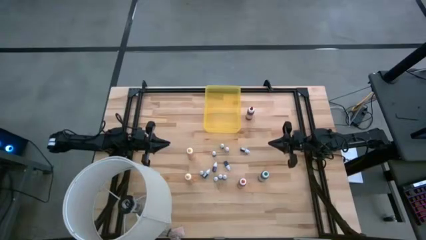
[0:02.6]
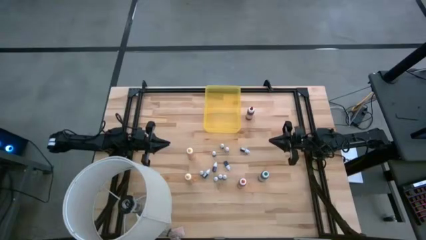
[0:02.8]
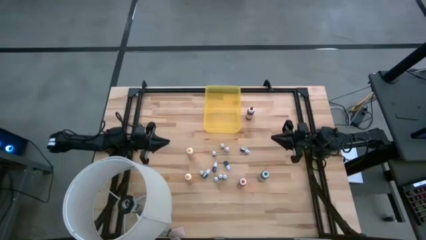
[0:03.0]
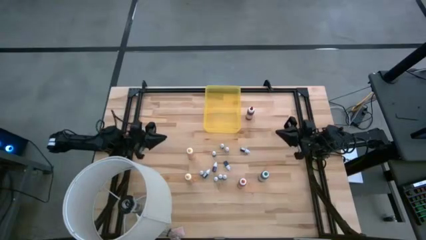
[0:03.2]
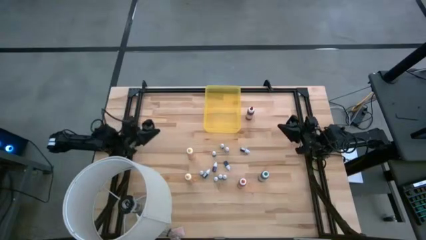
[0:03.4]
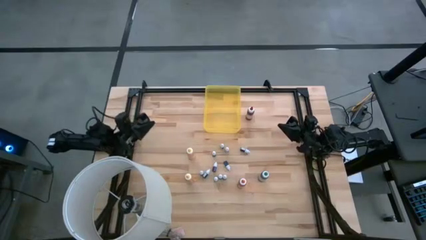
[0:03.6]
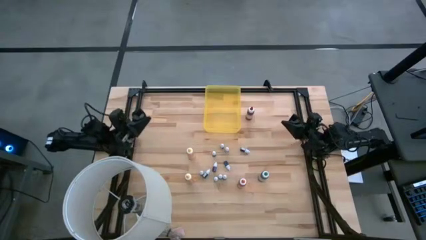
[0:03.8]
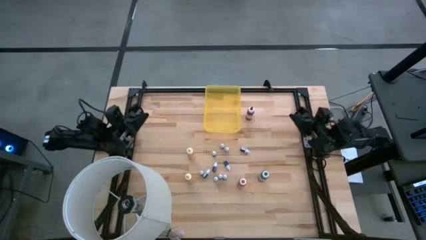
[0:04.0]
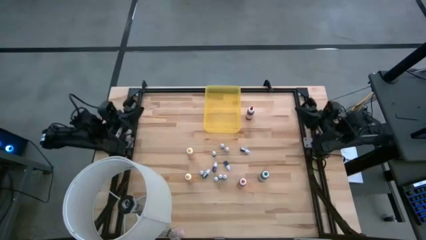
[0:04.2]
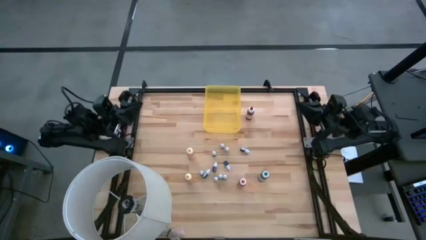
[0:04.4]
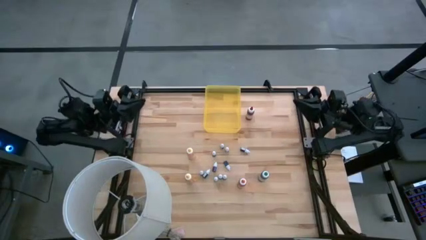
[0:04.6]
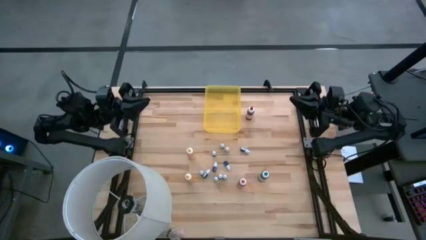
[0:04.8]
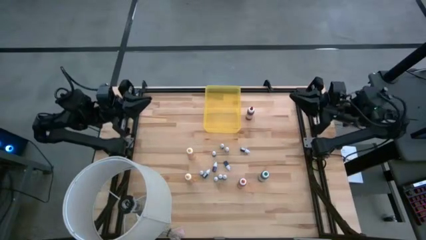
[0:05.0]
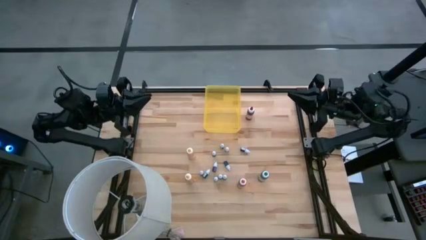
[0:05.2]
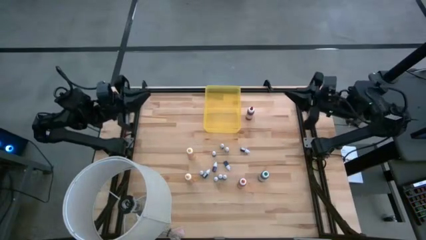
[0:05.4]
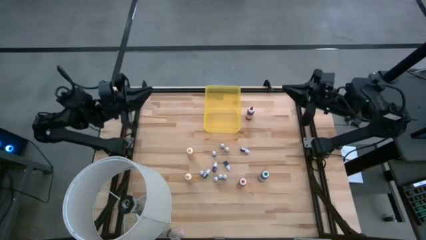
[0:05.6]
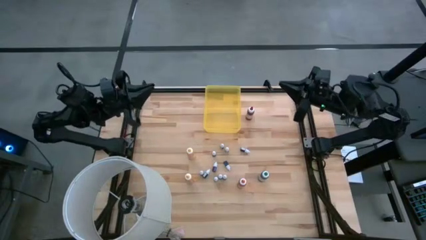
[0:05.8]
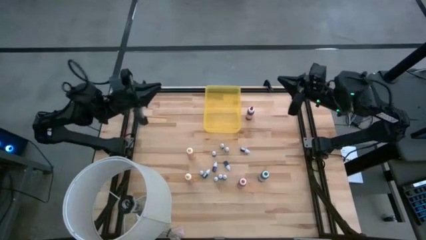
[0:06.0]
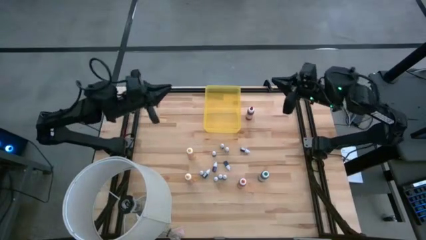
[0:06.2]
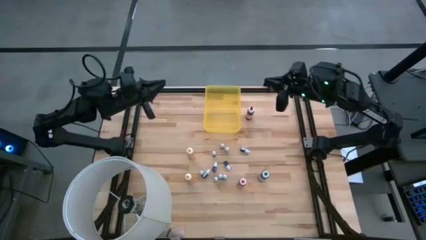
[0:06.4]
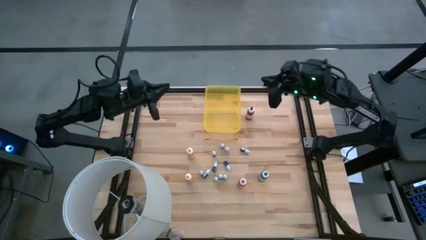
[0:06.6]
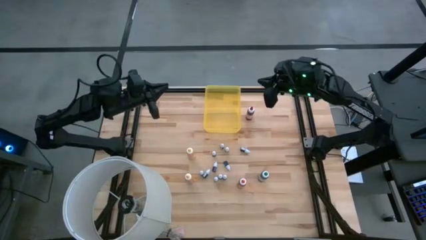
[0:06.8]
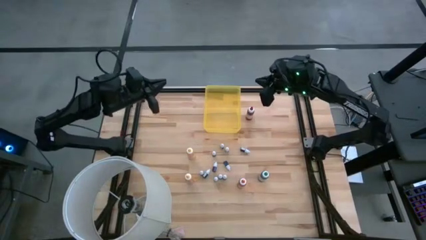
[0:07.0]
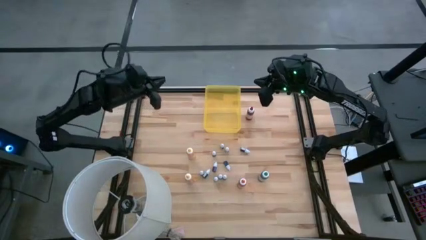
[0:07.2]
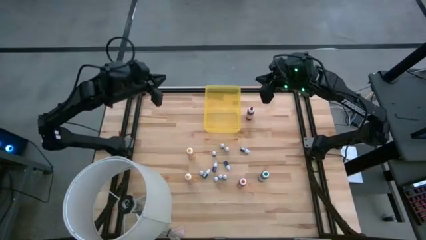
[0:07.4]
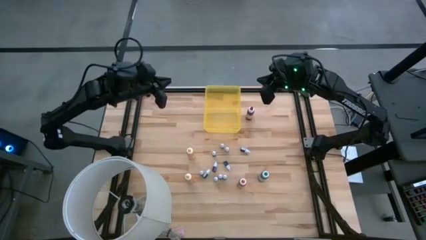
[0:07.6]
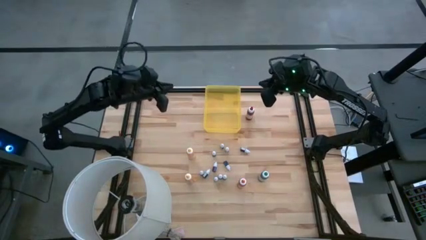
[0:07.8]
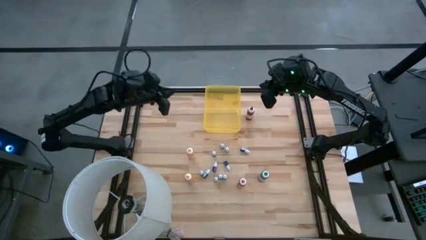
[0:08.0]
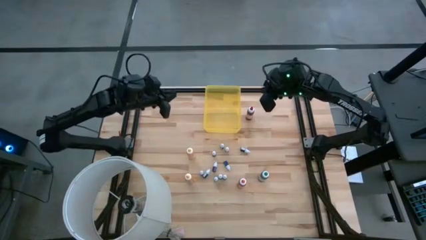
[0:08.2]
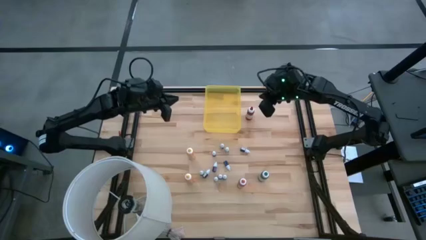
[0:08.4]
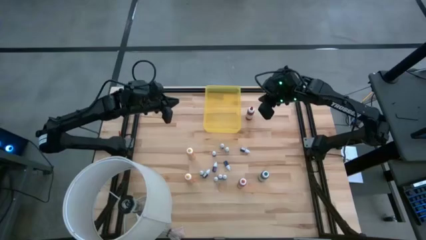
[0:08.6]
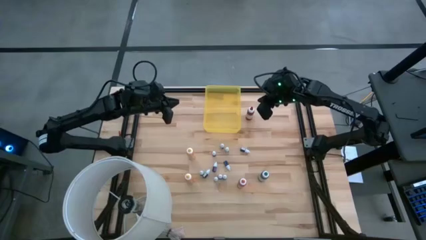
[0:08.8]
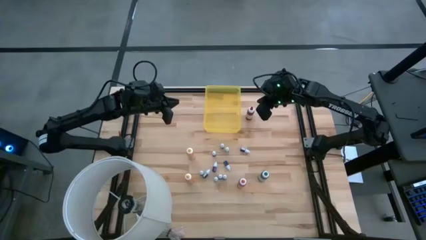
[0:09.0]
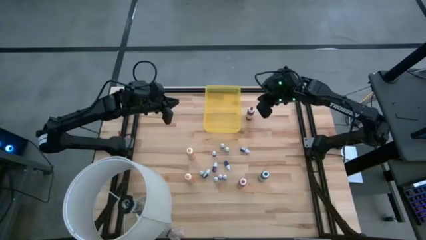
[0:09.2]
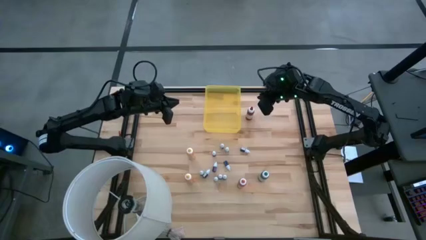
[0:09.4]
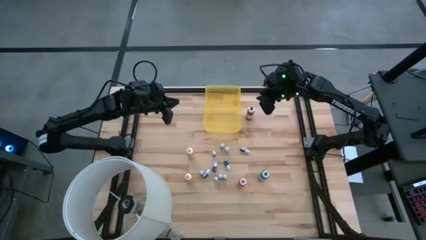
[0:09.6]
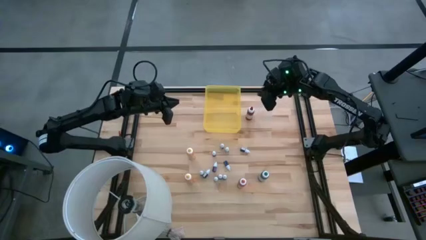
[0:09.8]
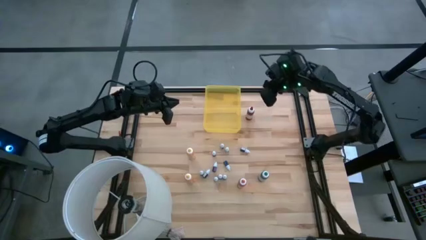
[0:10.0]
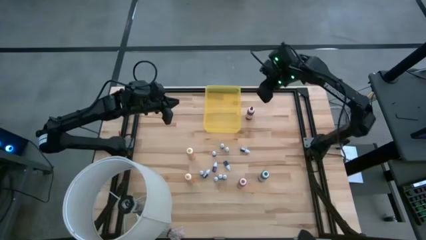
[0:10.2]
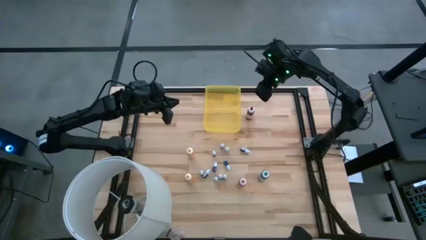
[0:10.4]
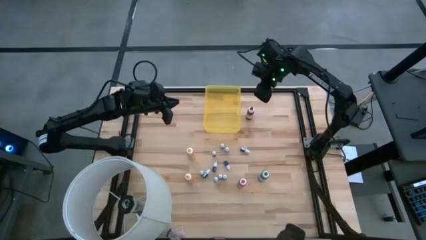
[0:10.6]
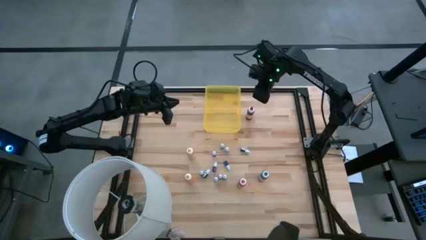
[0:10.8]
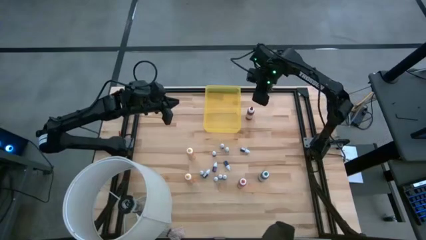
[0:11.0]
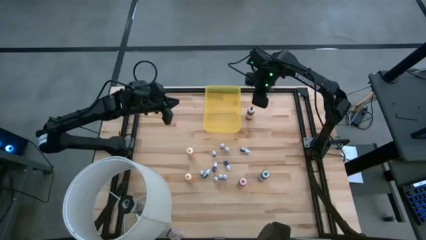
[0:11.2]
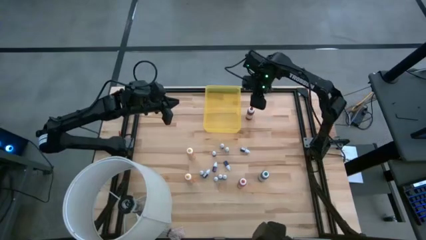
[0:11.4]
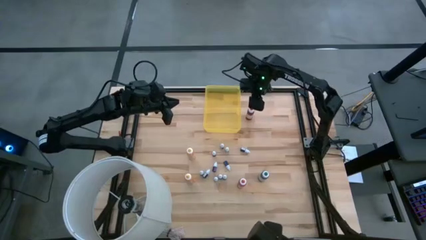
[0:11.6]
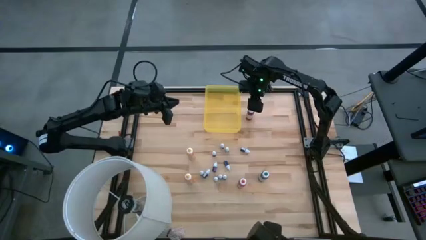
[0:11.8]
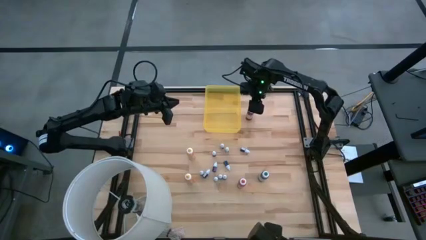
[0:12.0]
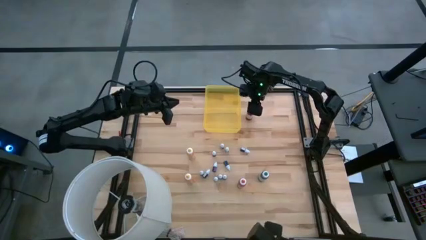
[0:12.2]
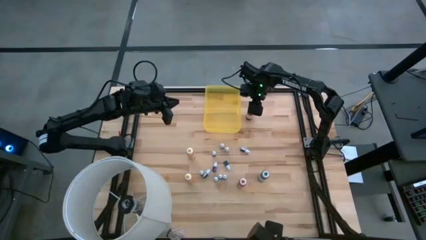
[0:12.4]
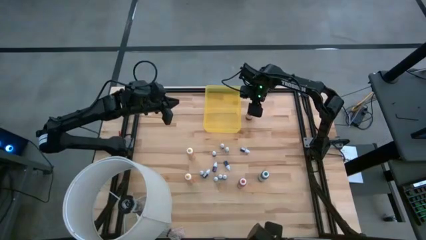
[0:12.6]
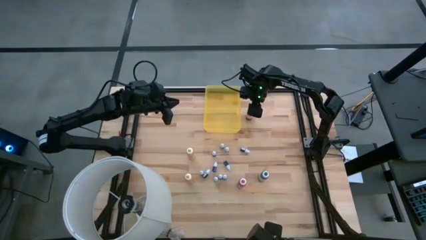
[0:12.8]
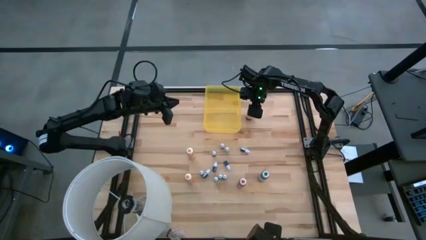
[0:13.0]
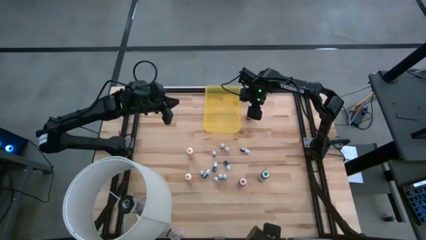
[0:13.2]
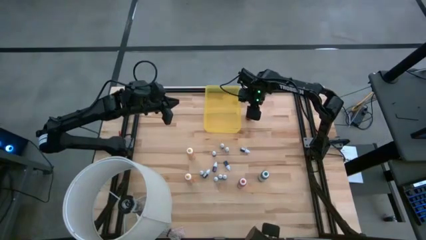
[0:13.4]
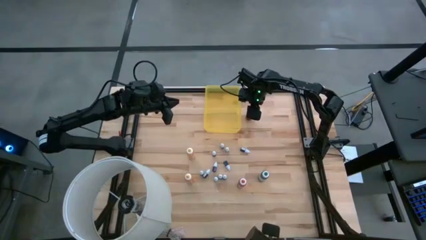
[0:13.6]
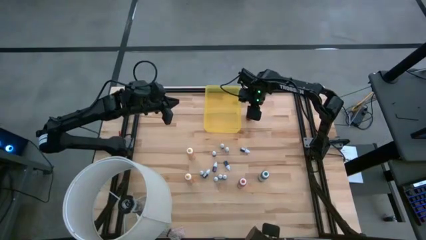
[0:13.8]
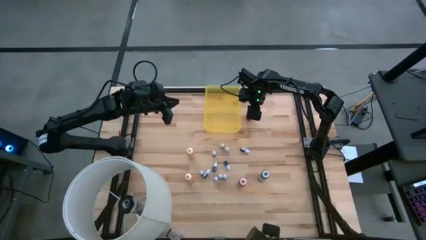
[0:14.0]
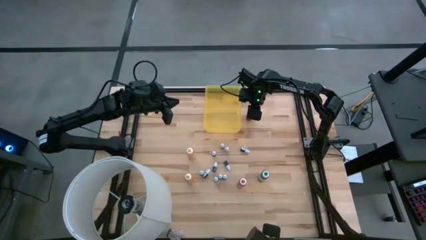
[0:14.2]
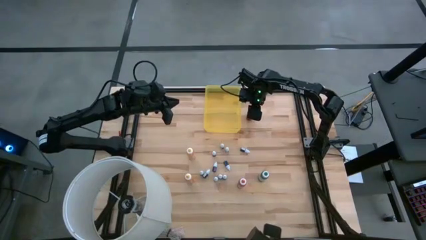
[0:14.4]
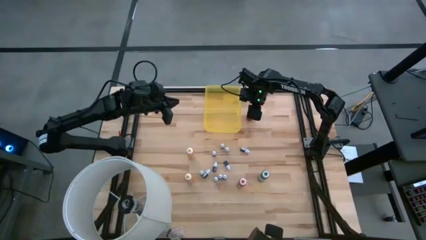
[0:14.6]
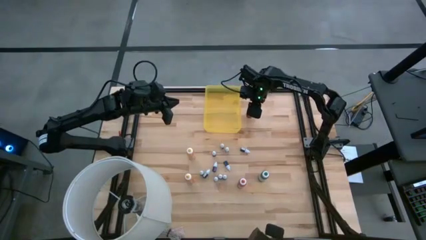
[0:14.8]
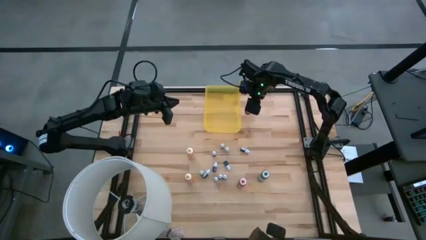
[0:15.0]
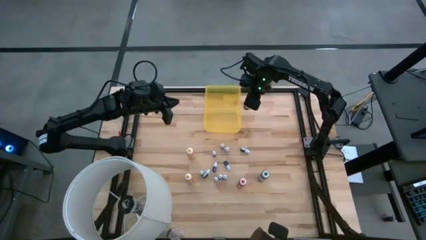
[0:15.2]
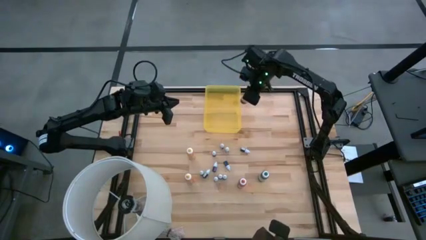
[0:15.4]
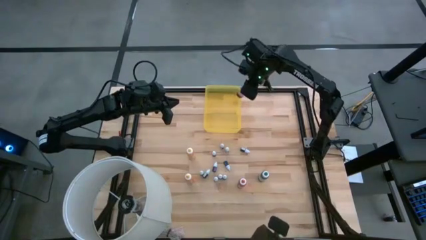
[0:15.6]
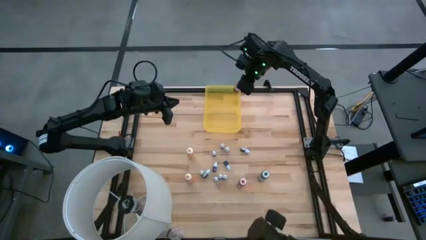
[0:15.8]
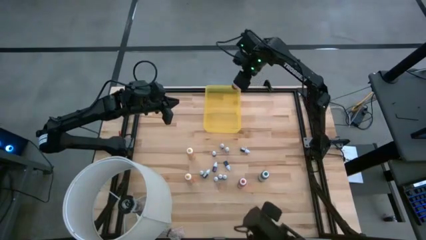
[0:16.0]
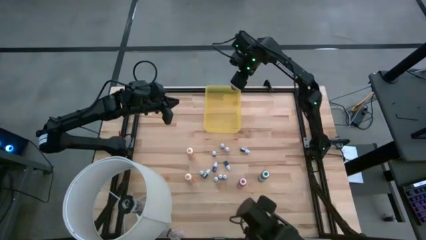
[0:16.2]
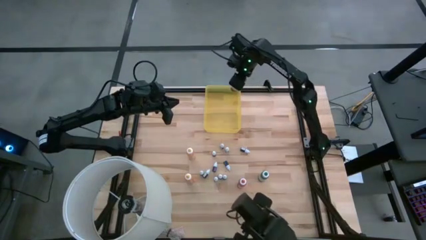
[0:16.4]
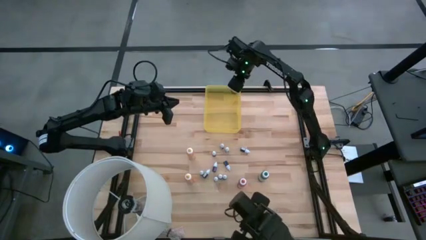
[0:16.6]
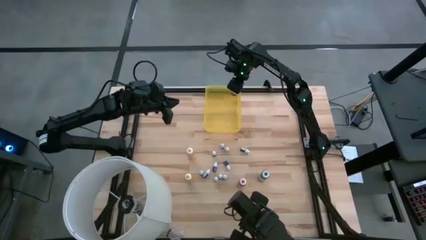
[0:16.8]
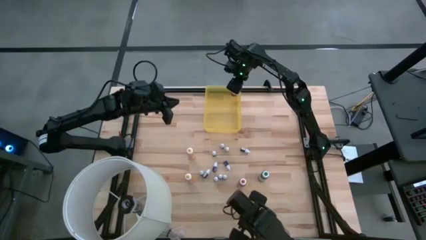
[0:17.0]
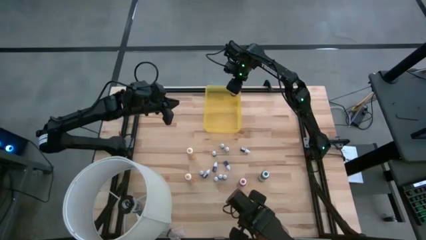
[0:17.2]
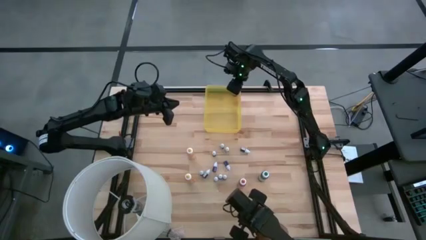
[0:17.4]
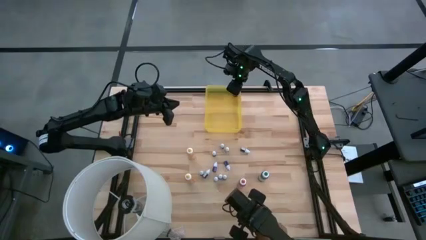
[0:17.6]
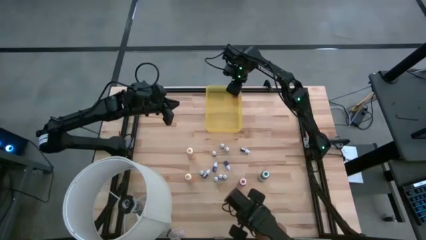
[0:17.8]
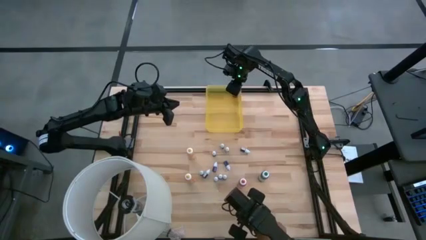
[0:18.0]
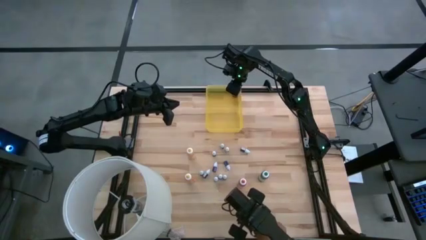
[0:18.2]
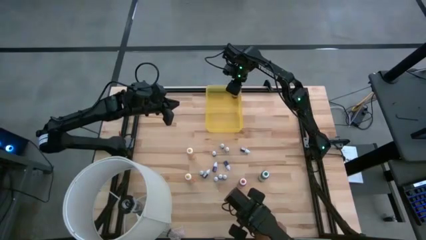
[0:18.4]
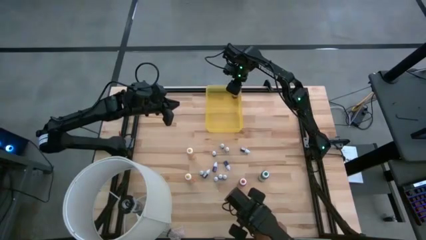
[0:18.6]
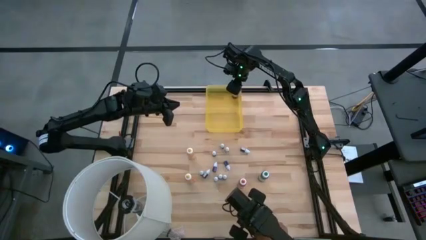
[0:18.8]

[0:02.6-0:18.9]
Task: Pick & Place food coloring
Put the large red food coloring bottle into the yellow container
